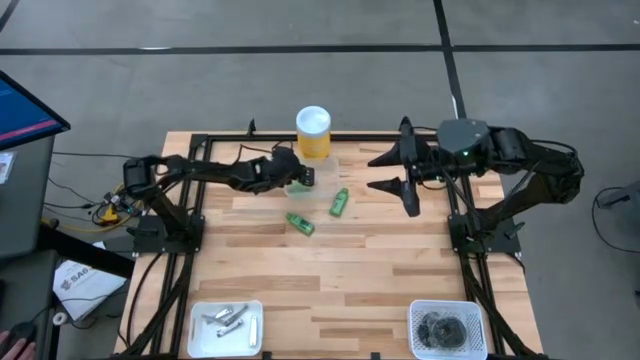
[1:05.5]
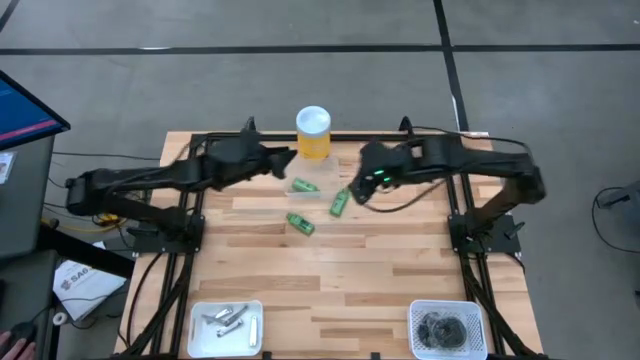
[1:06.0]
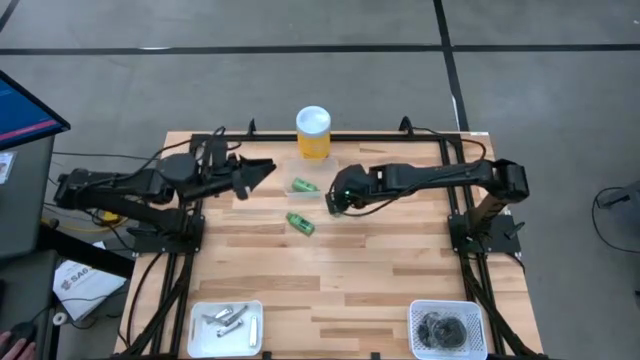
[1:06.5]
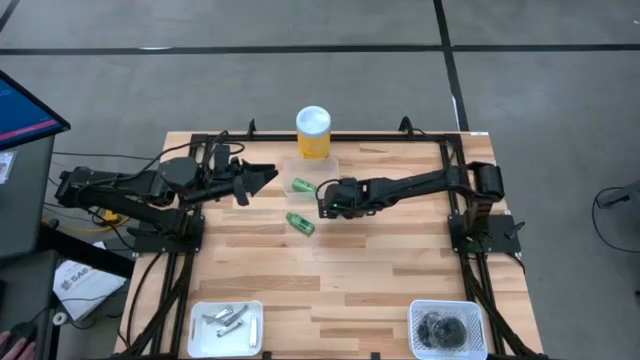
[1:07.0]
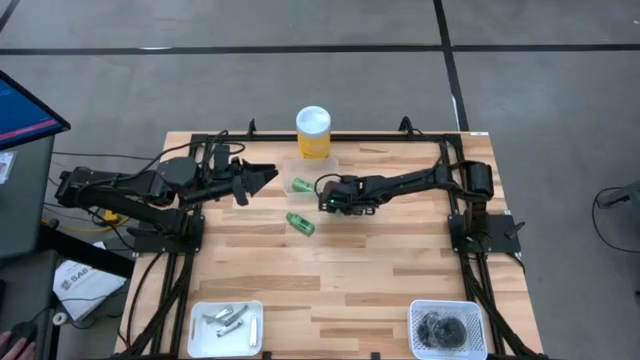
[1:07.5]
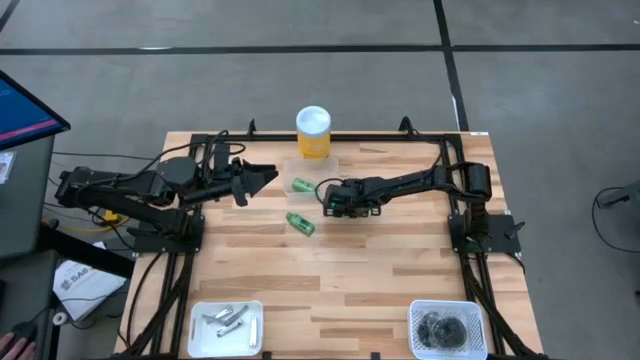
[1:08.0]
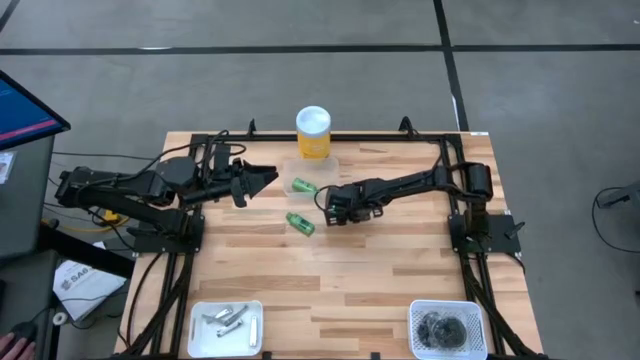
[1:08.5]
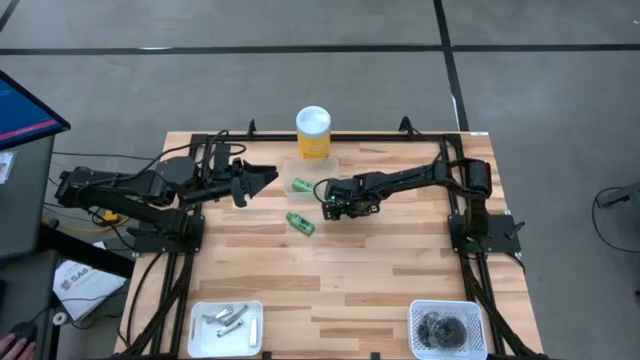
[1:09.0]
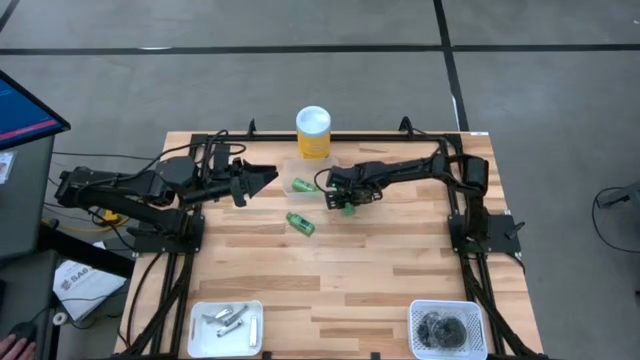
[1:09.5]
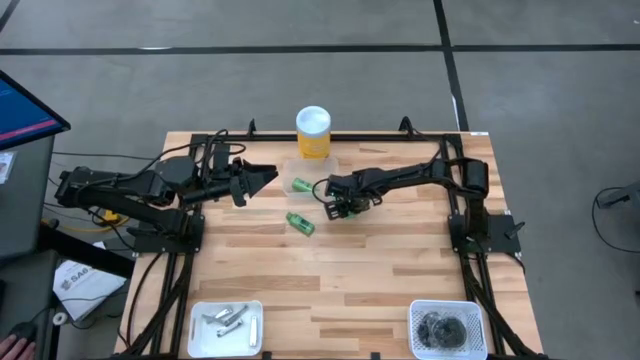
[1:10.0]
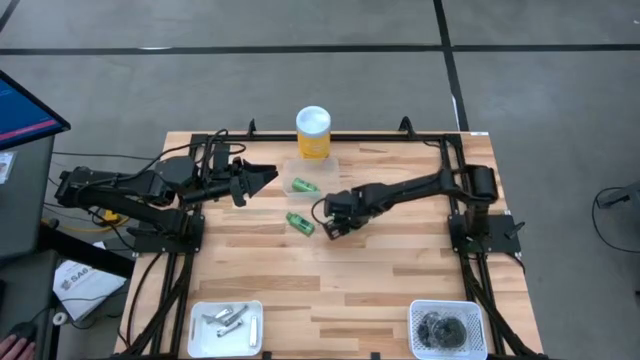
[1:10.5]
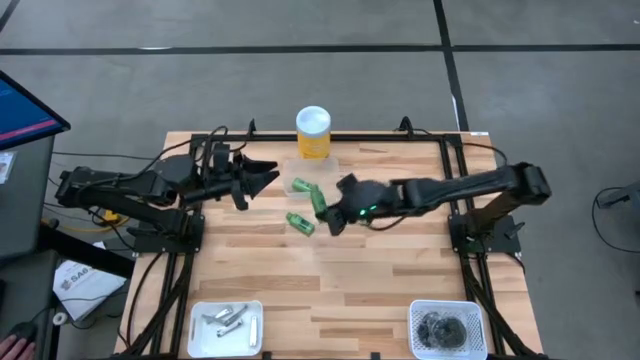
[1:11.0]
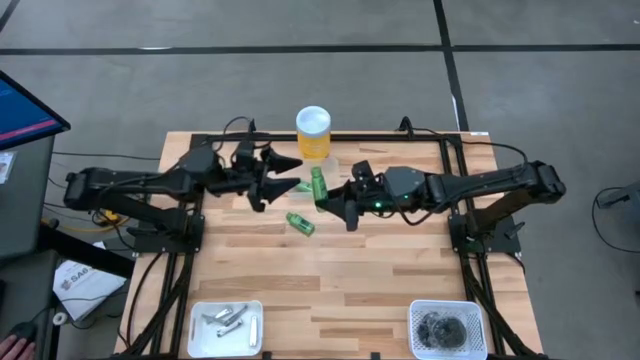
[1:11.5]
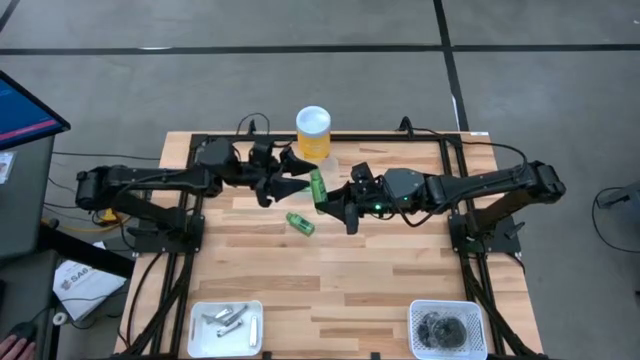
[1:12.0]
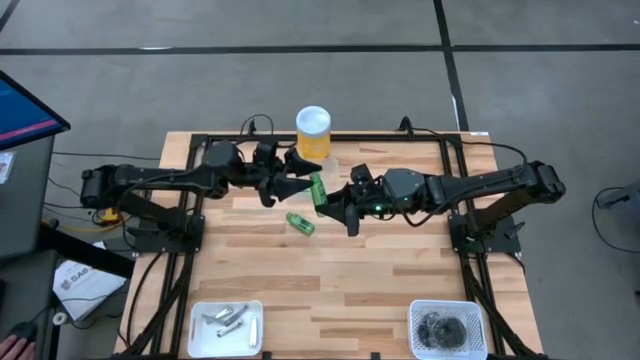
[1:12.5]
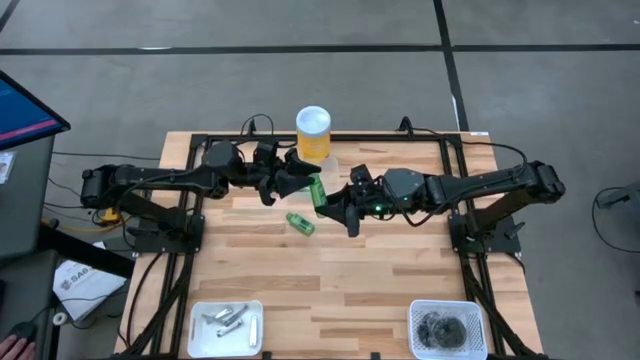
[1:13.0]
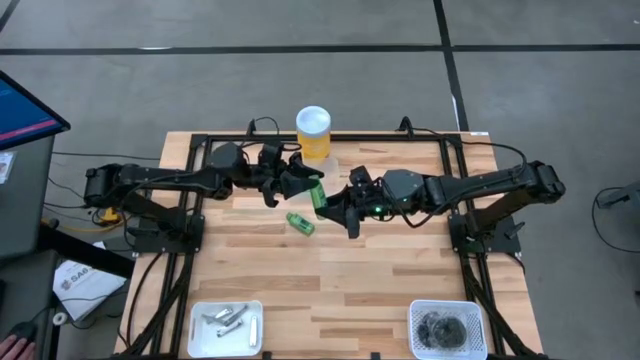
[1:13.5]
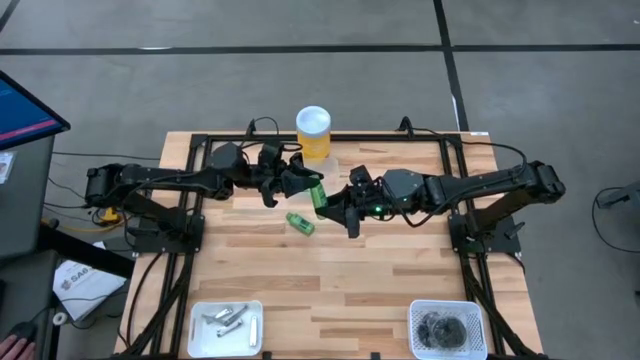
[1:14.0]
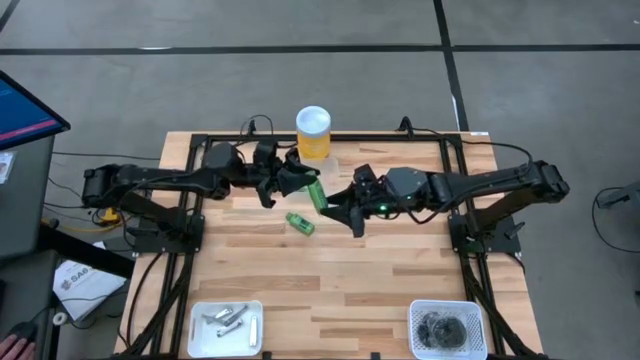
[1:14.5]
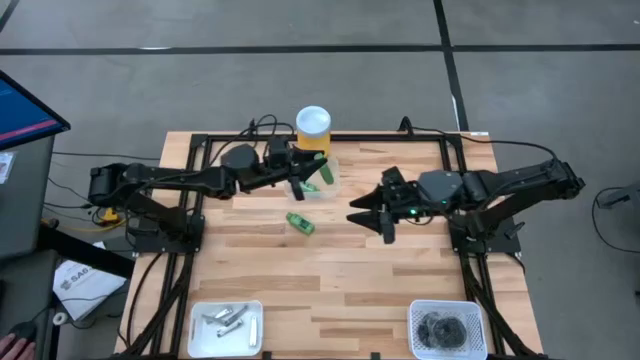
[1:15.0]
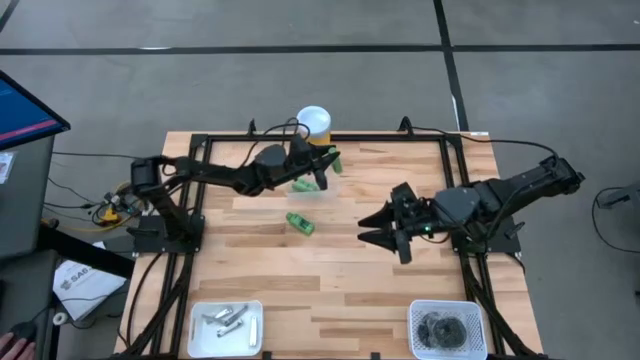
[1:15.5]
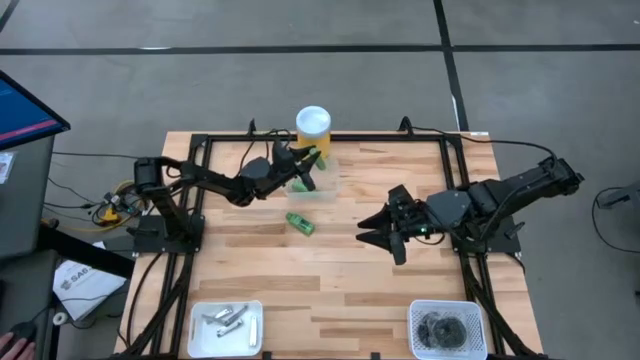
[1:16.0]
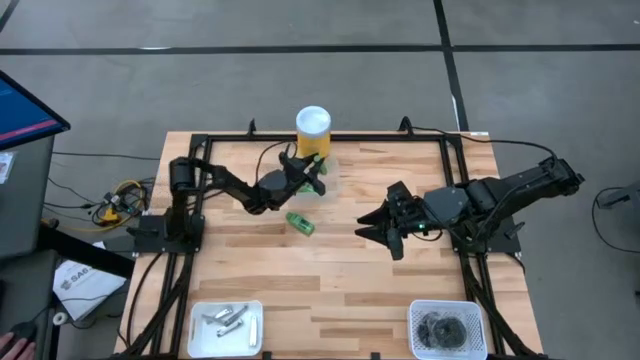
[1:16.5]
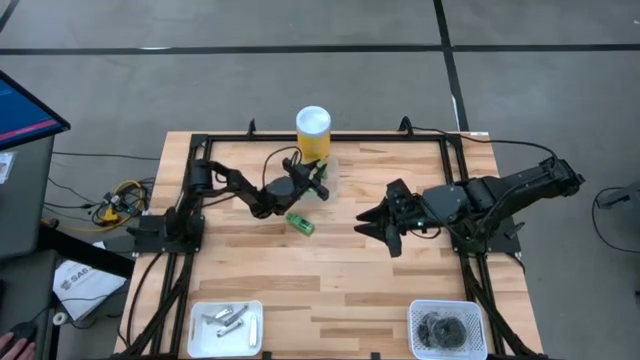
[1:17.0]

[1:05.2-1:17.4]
Task: Pick & Place Travel size toiletries
Put the top green shampoo into the transparent bin

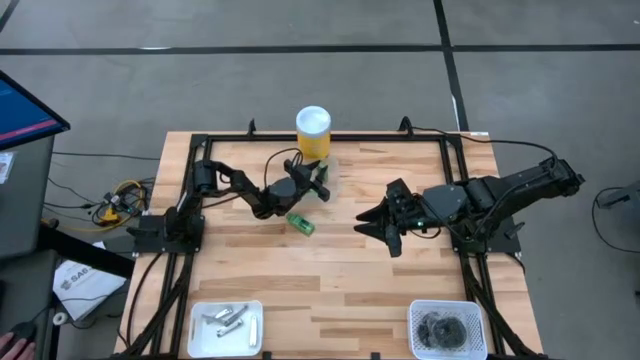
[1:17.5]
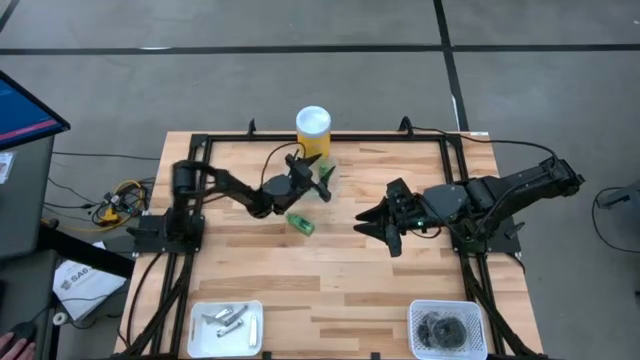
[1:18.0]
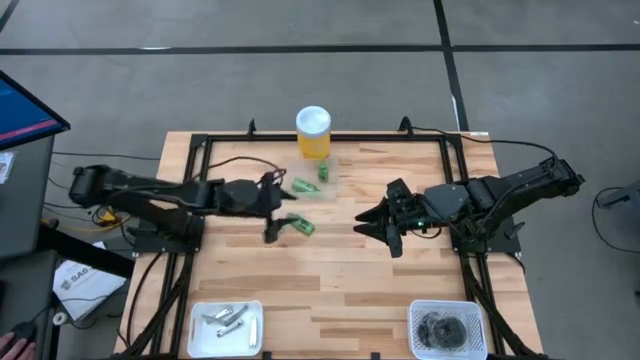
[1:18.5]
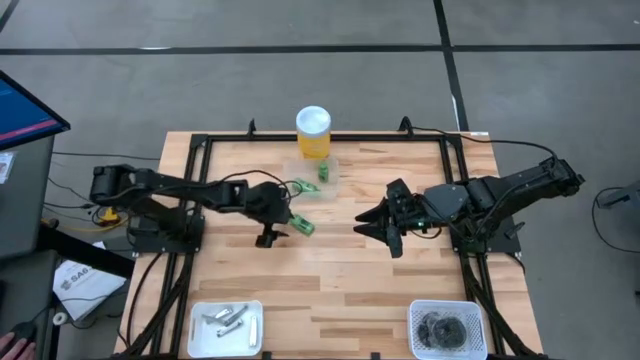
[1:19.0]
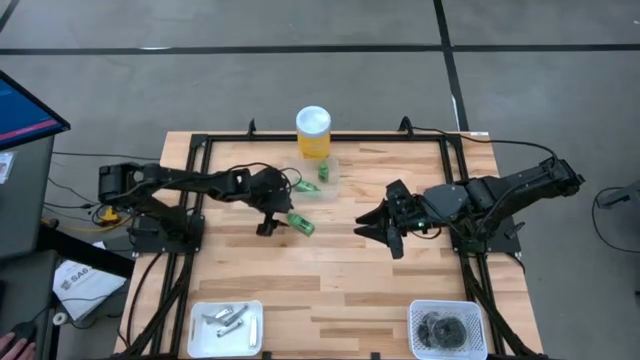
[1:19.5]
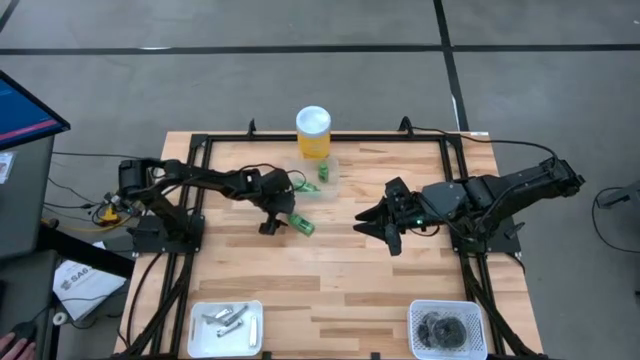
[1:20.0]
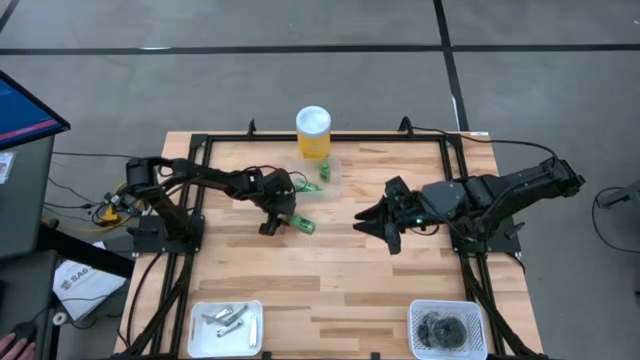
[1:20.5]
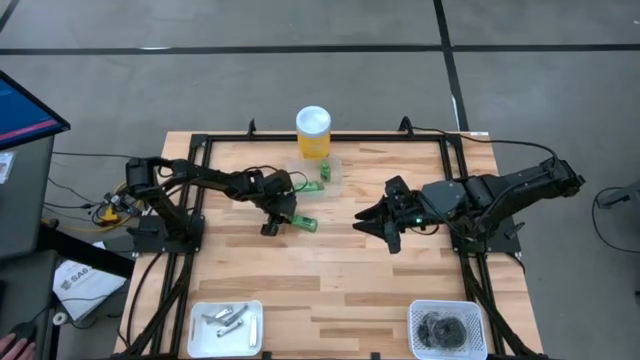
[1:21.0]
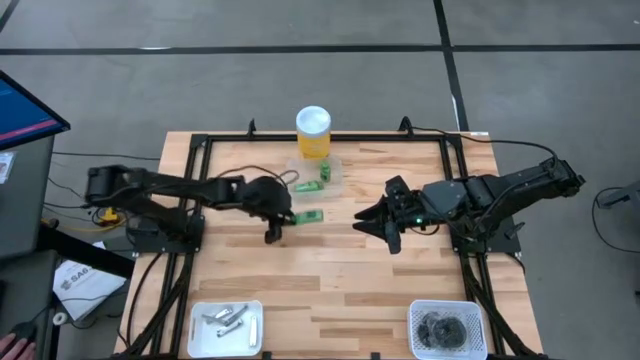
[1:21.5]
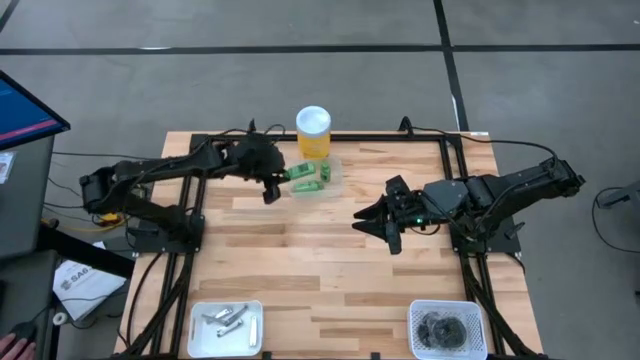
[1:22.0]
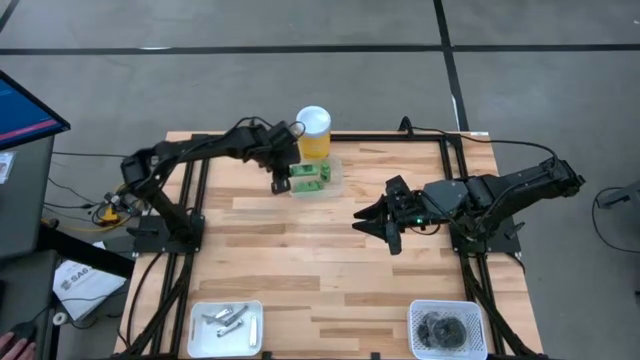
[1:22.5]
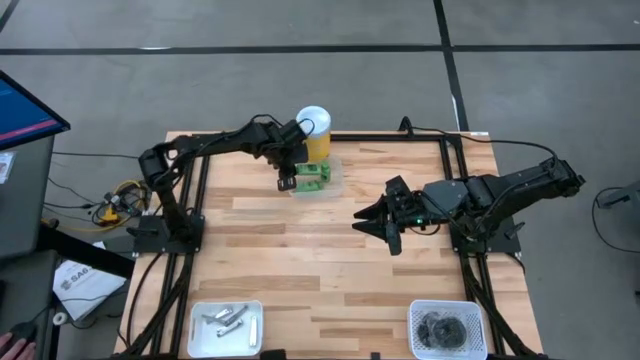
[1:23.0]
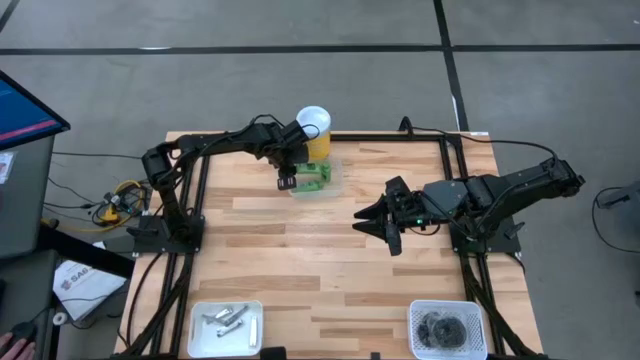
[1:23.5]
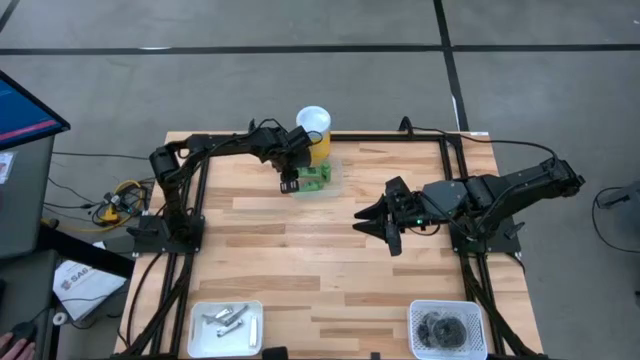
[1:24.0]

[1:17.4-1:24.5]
Put the green shampoo into the transparent bin

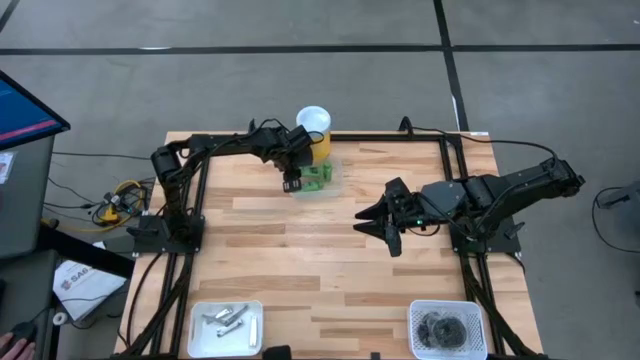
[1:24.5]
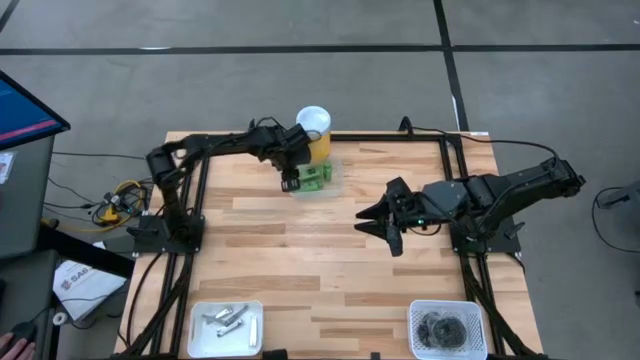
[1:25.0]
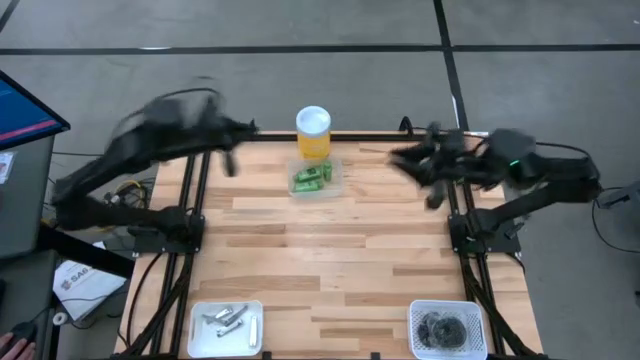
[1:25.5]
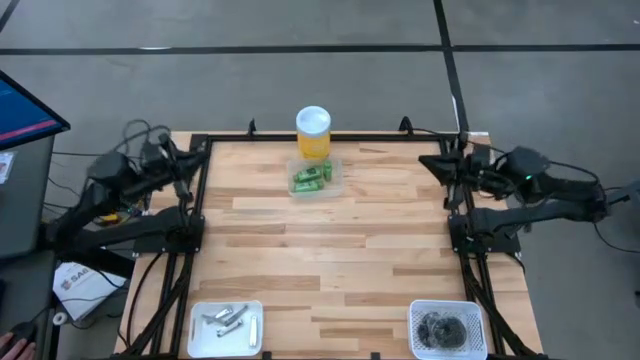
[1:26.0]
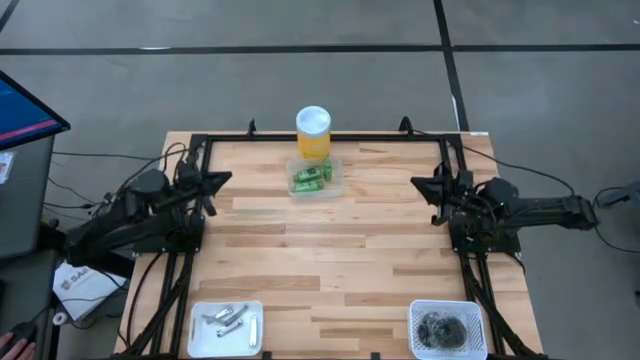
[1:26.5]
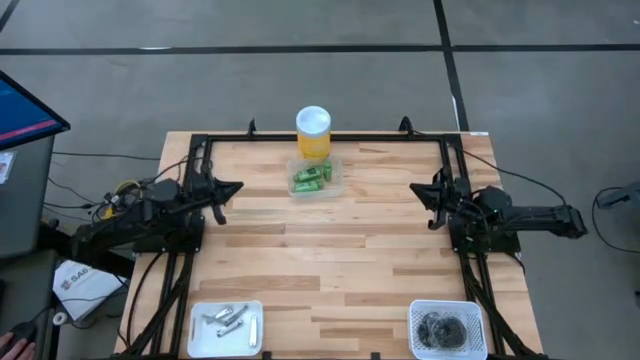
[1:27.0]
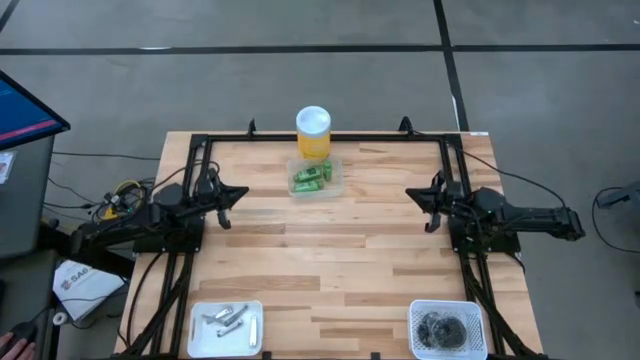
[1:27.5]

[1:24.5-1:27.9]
Return to Home Position
